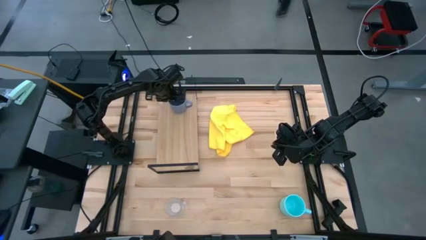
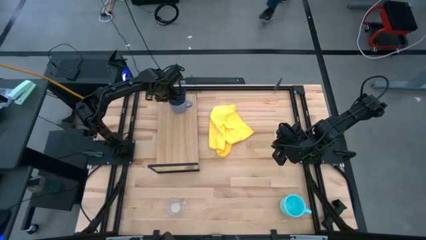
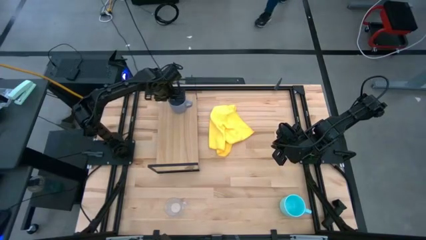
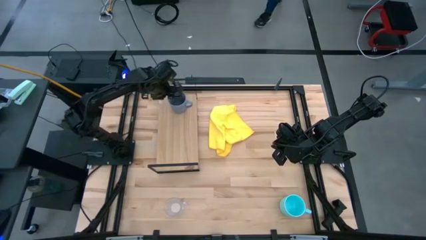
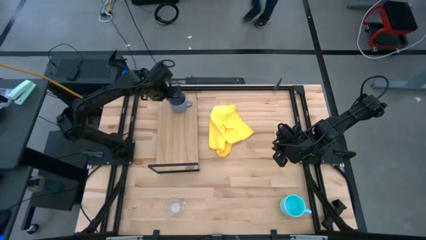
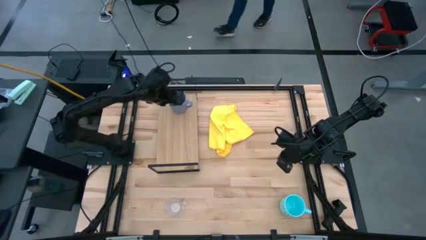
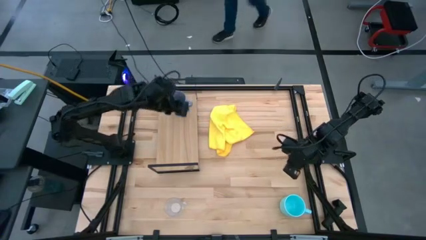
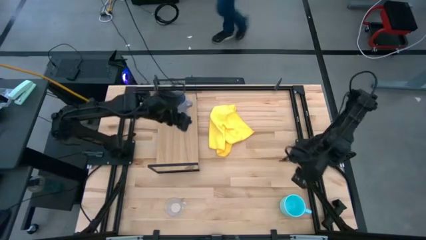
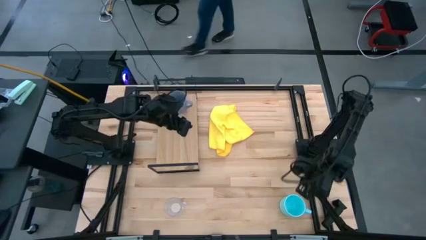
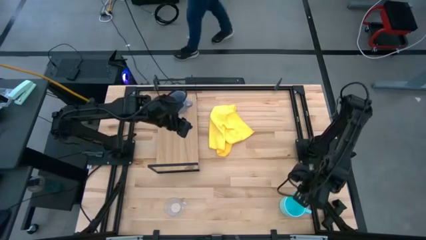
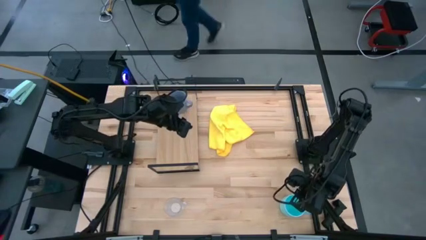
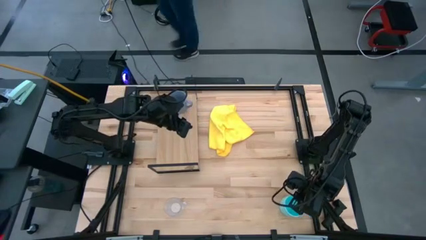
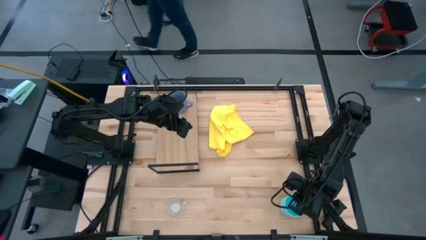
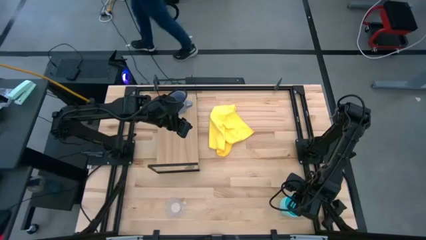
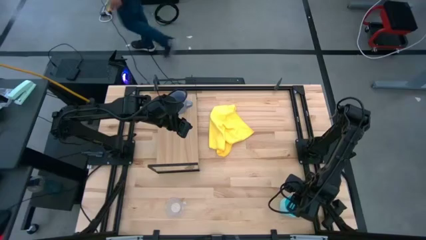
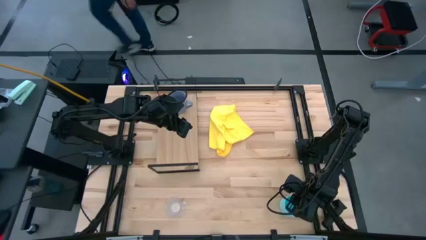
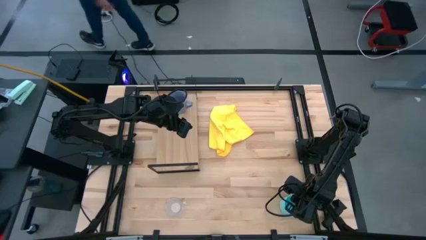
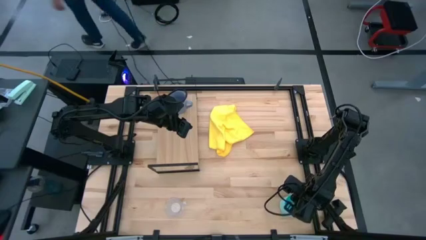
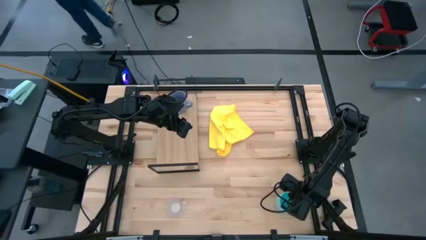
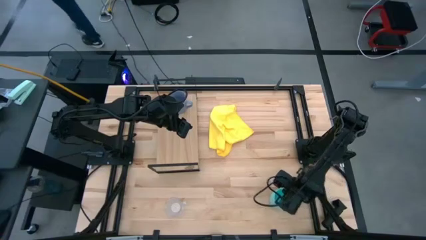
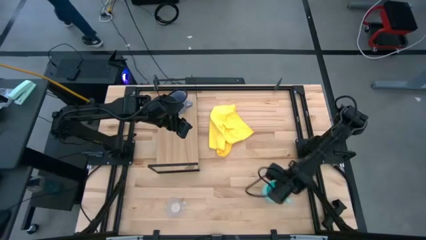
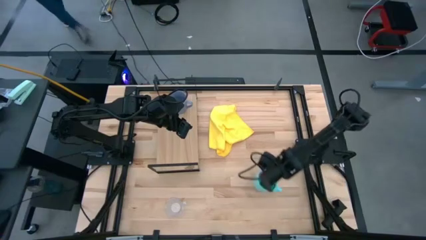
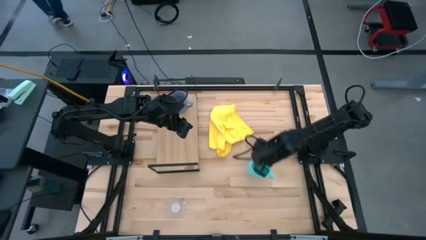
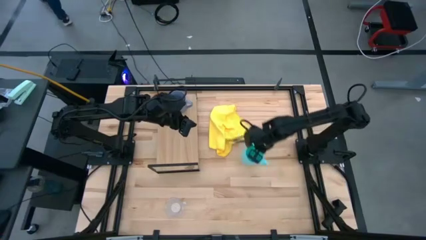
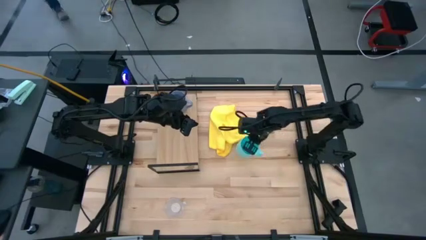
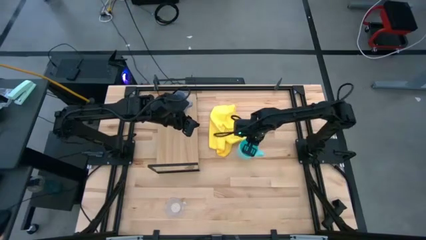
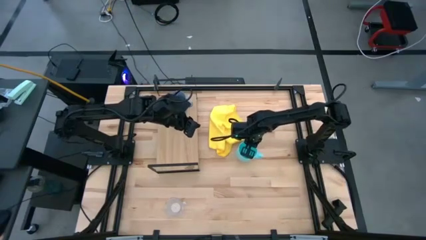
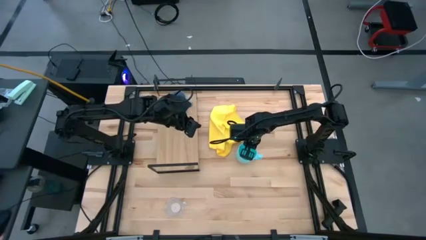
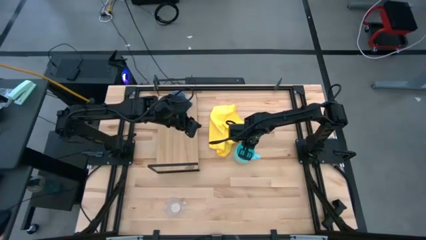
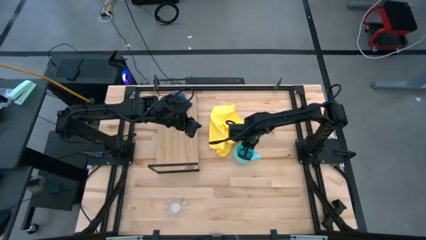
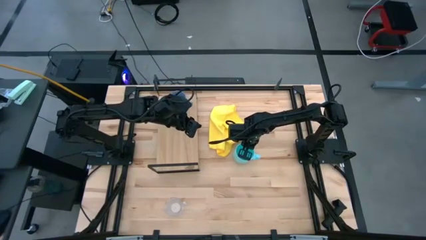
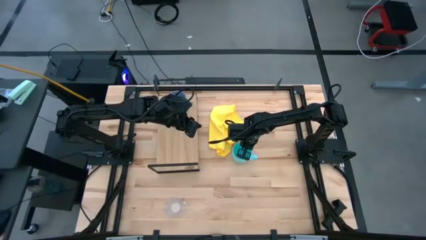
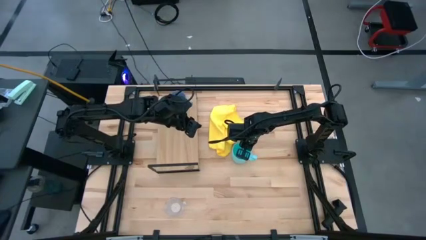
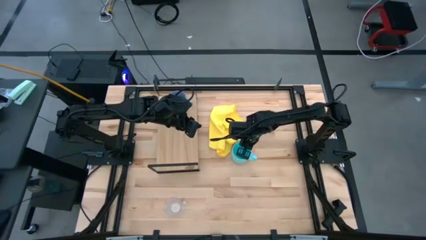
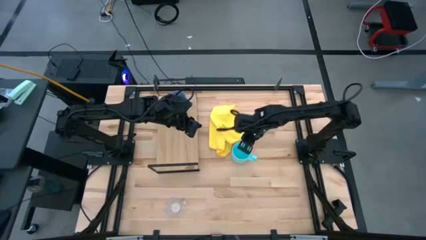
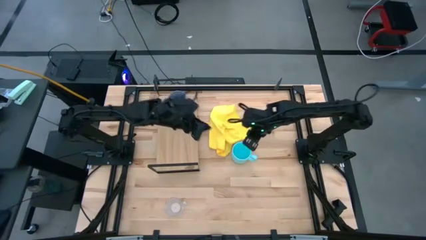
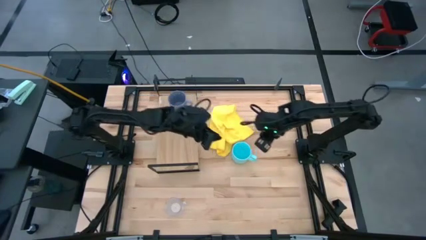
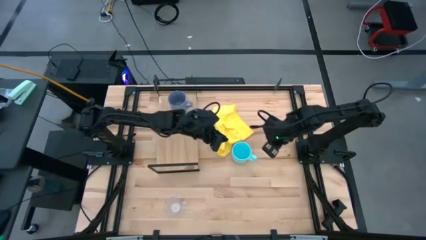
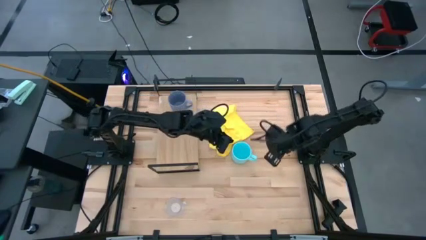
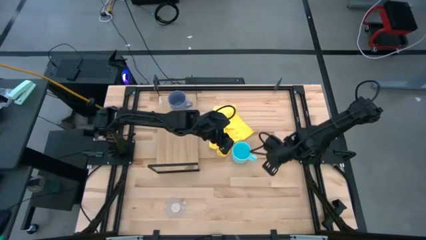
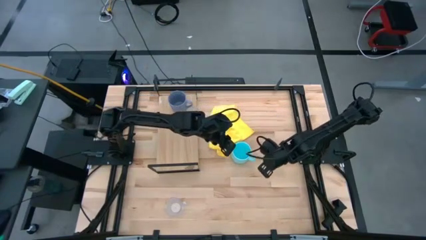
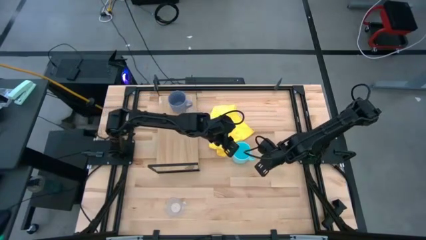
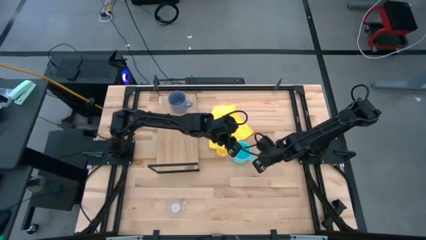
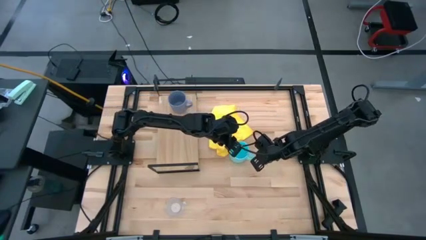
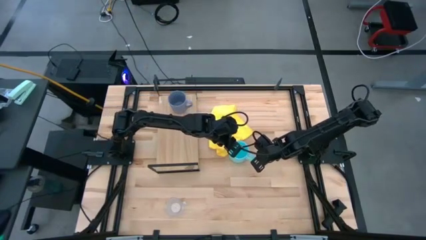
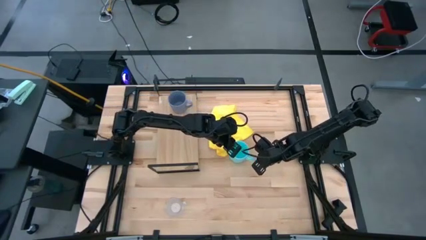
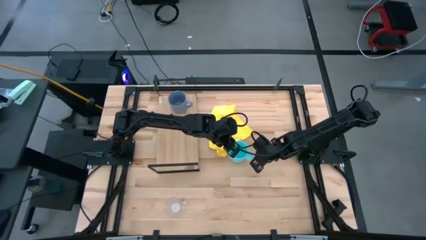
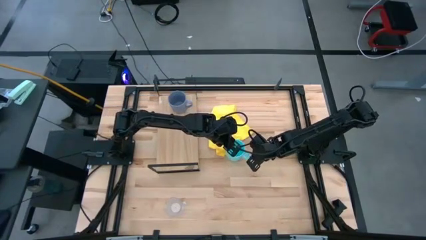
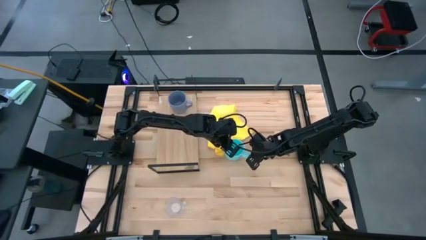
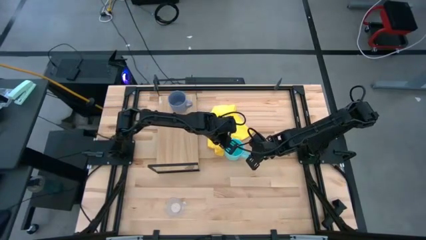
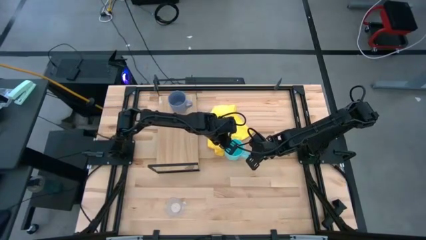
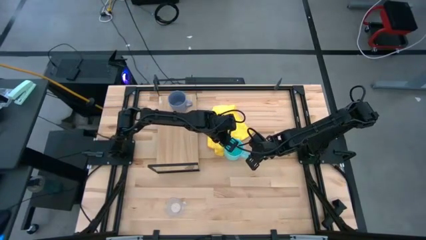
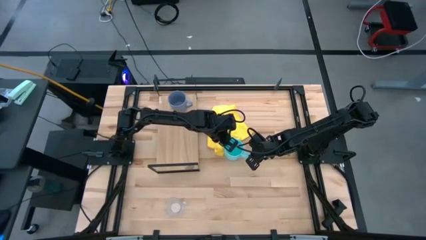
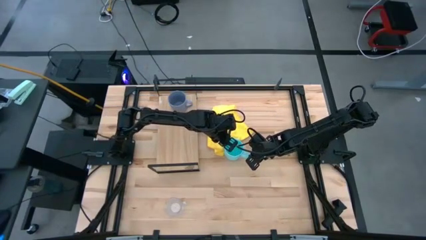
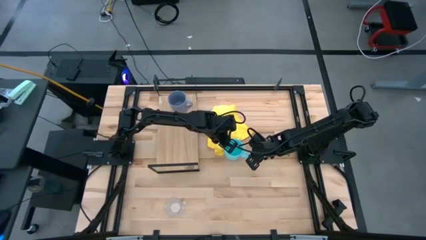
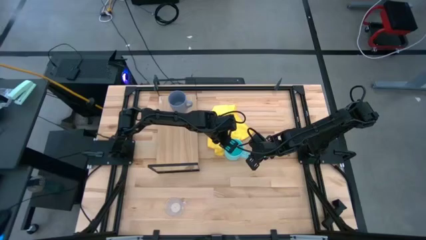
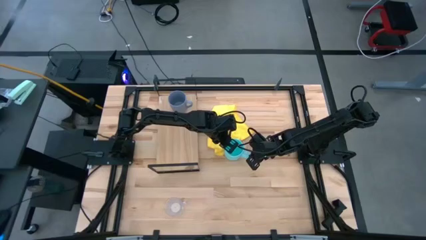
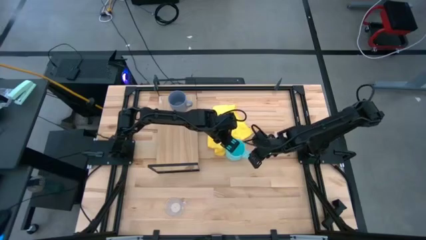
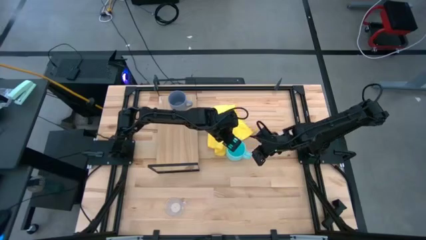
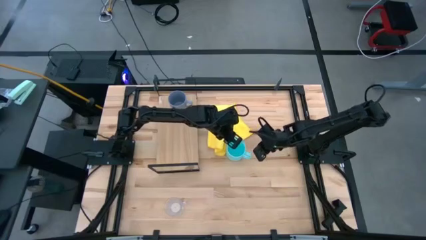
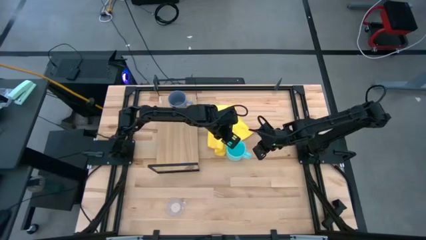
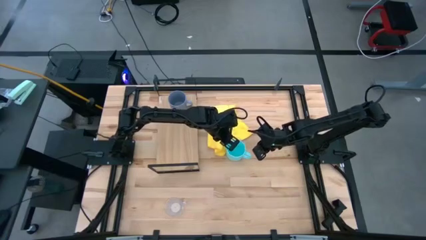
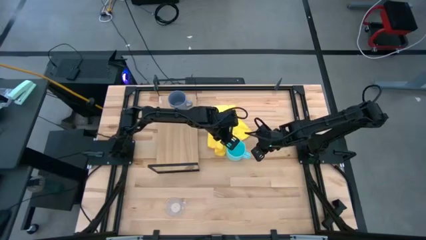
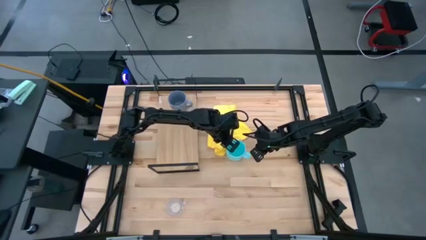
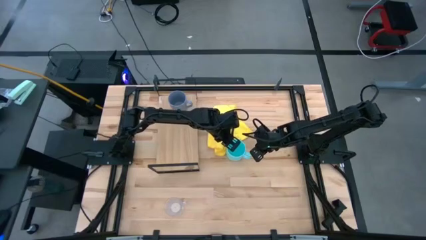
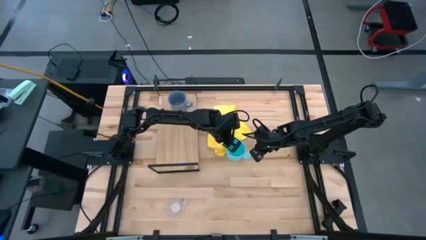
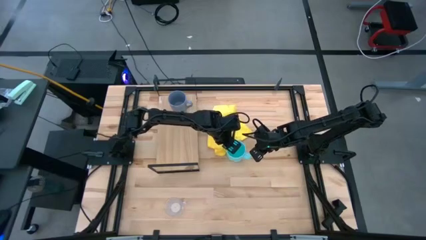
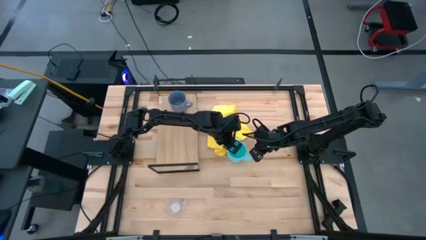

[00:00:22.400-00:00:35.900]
Task: Stack small to large cups/mugs on shelf
Put the blue mug on the shelf
